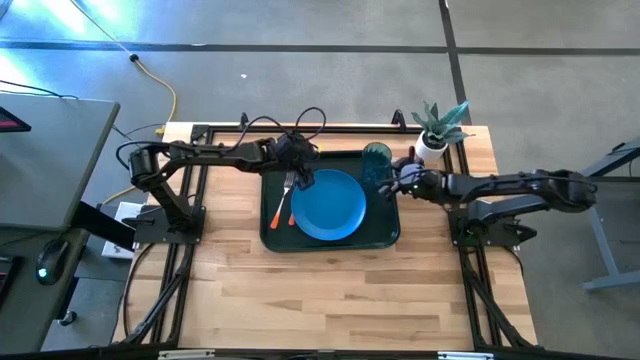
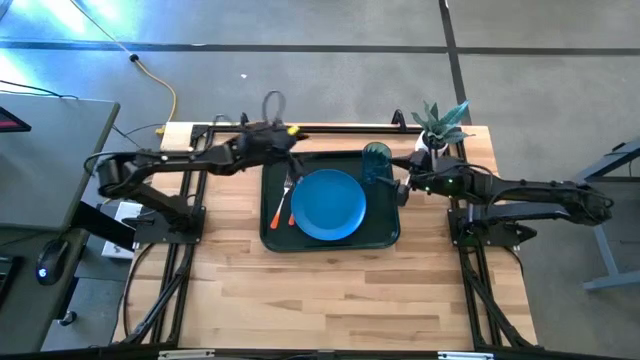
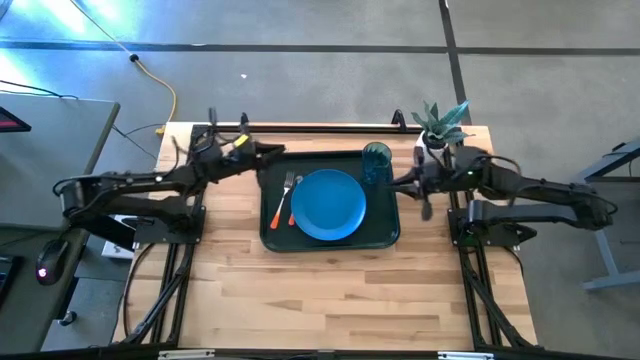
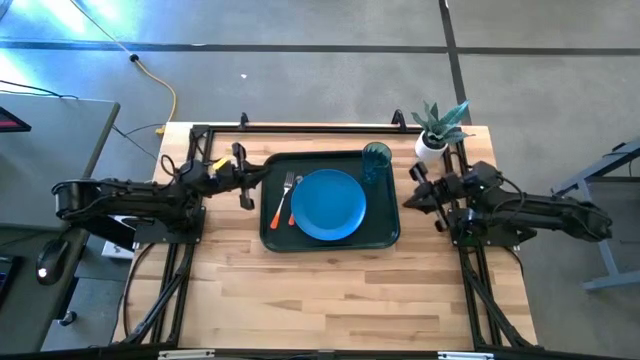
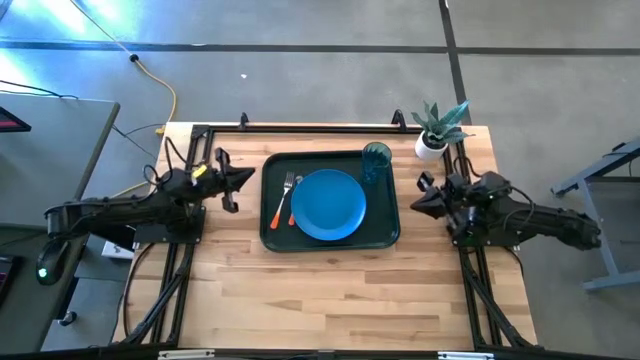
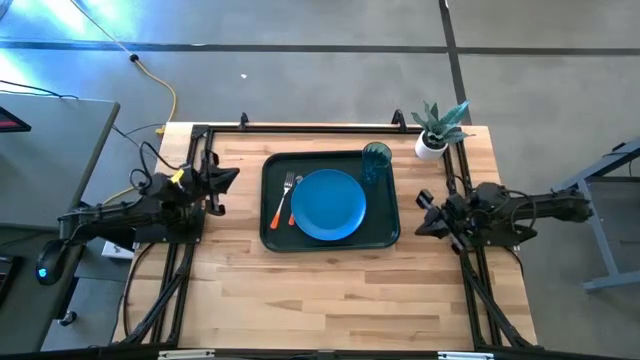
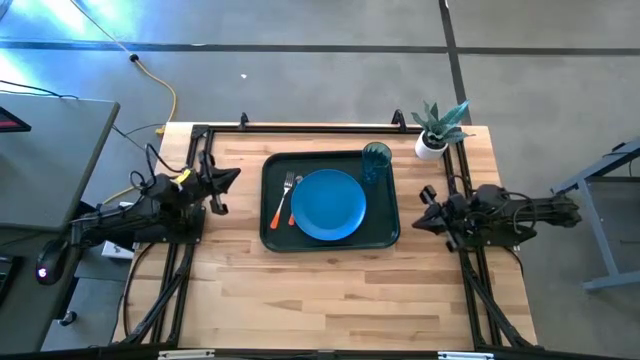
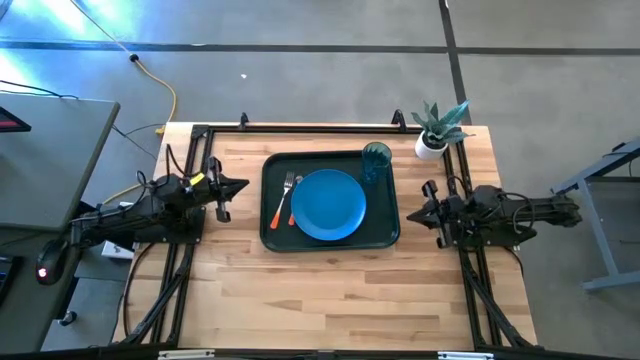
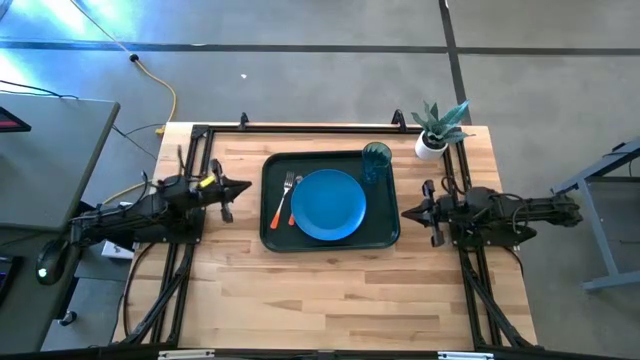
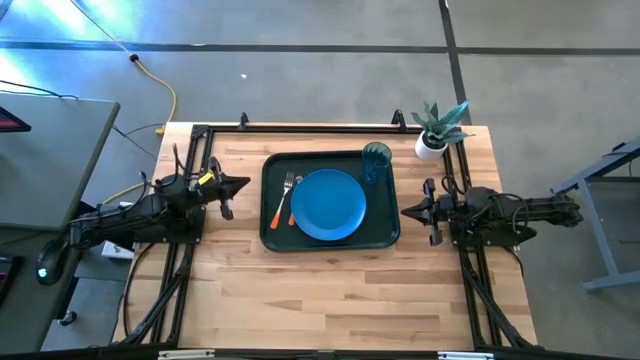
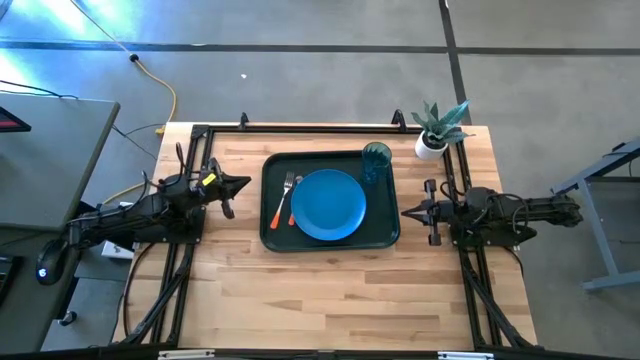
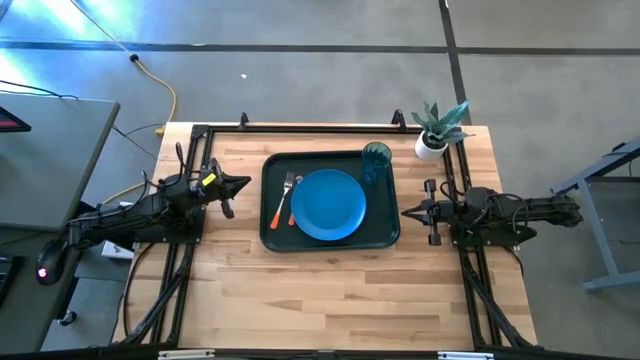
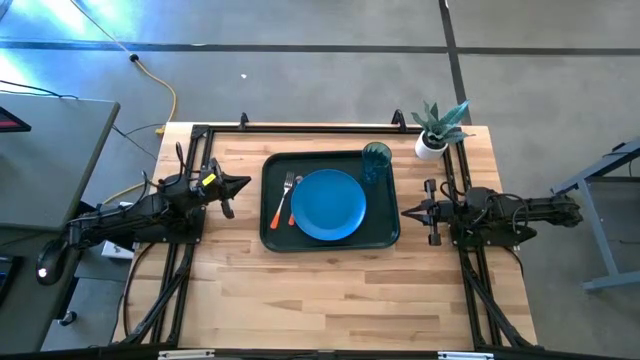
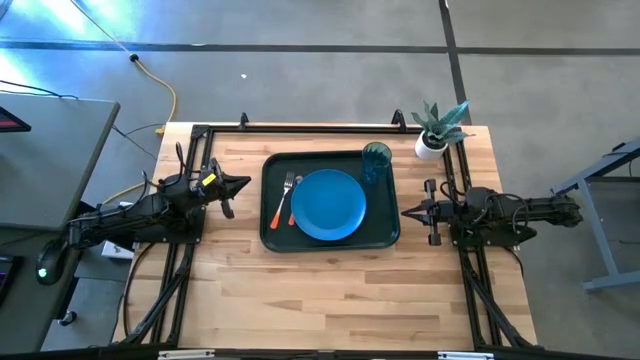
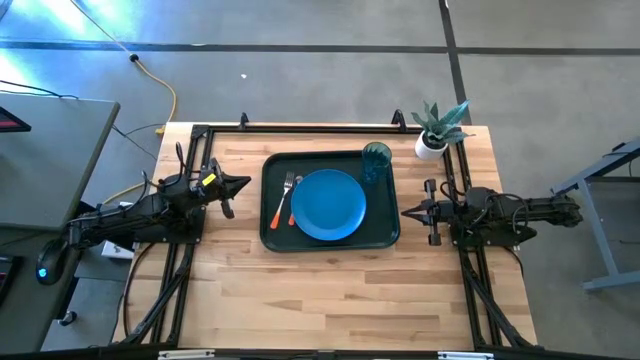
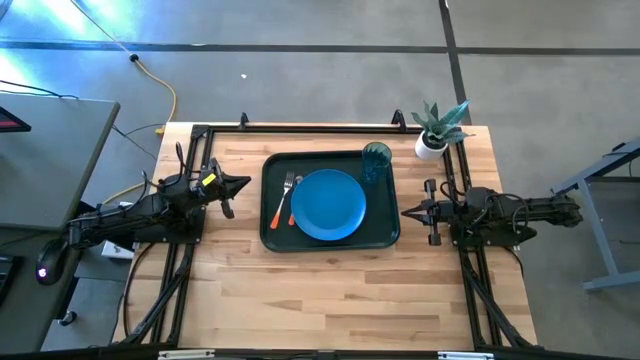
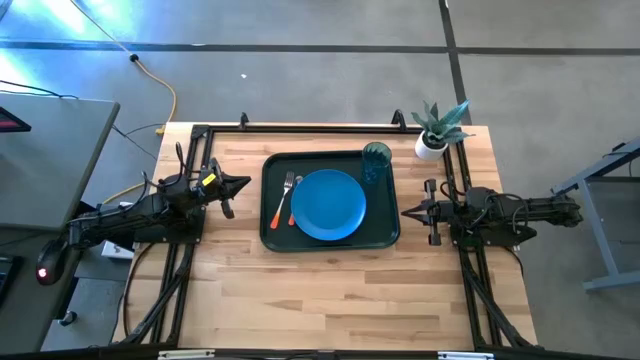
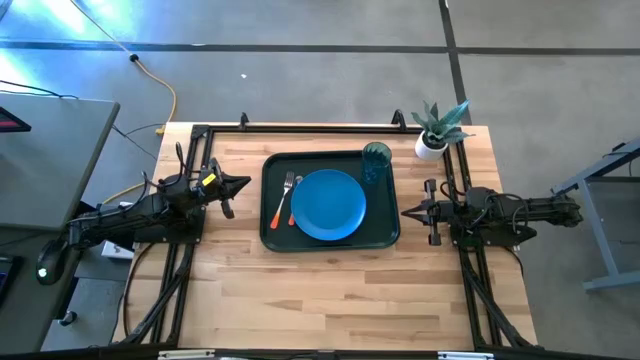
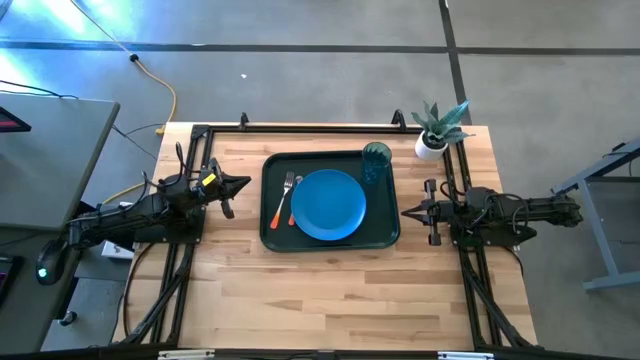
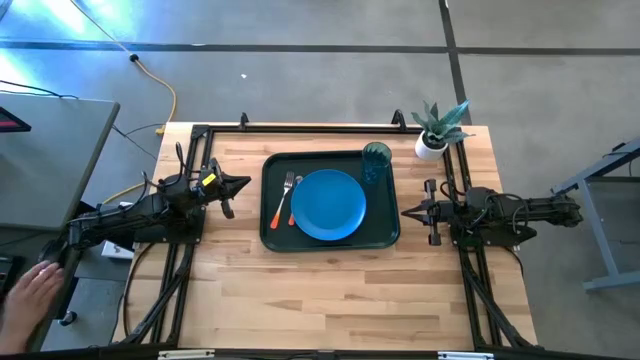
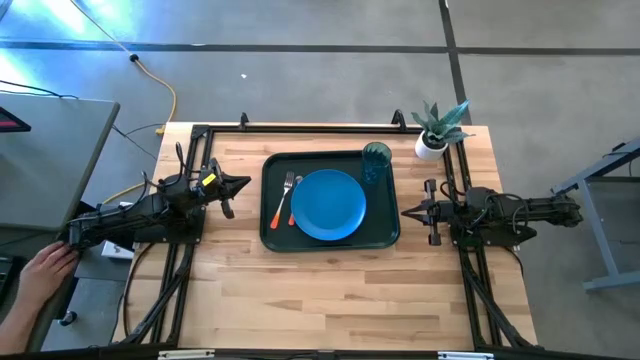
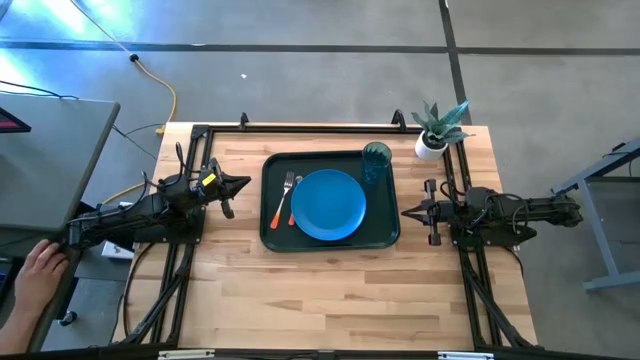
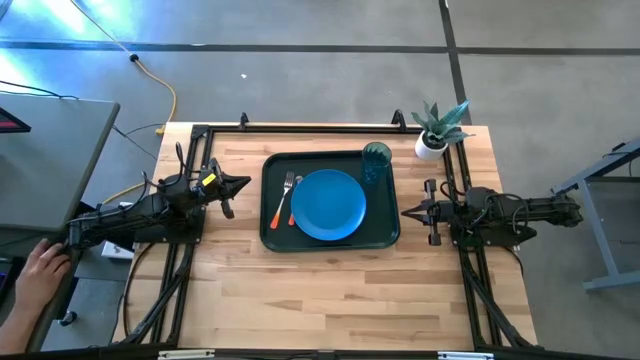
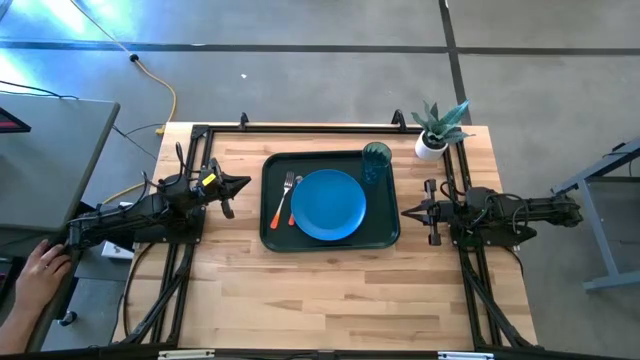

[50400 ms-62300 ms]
Task: Pick and place plate/cup/fork/spoon on tray
Return to Home Position

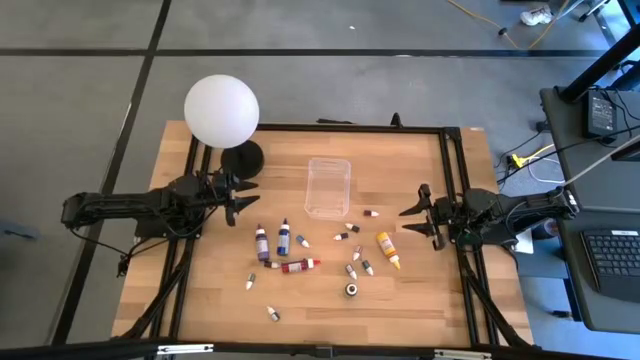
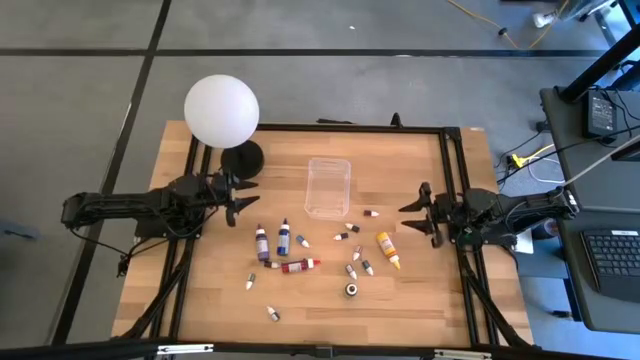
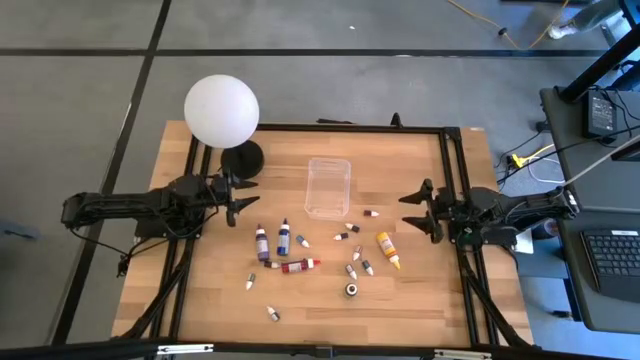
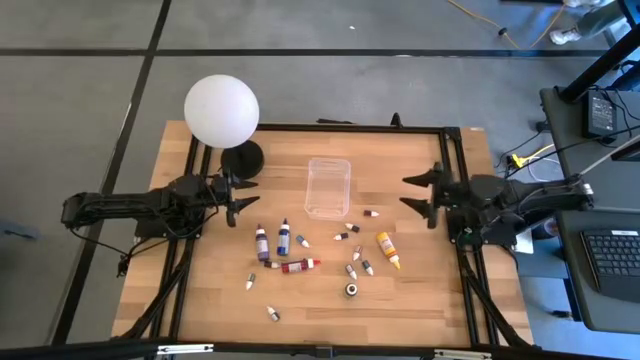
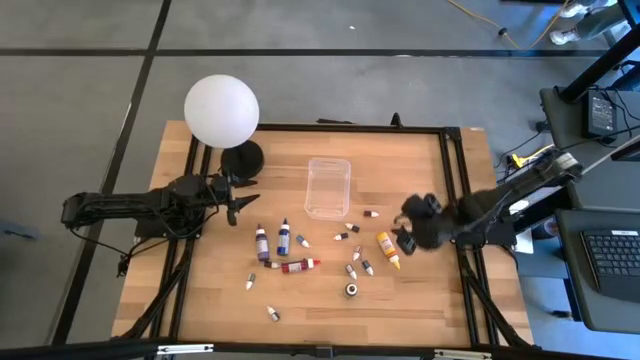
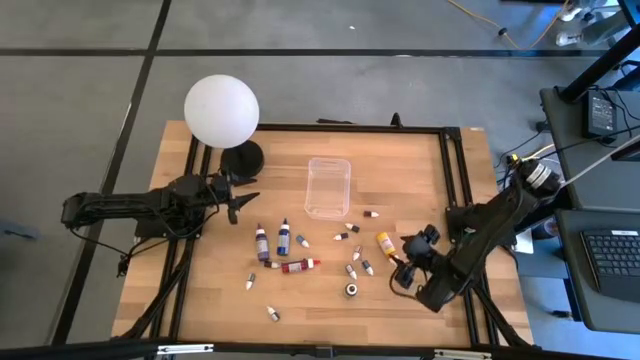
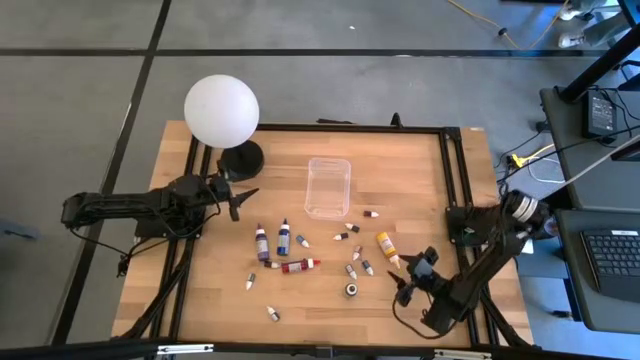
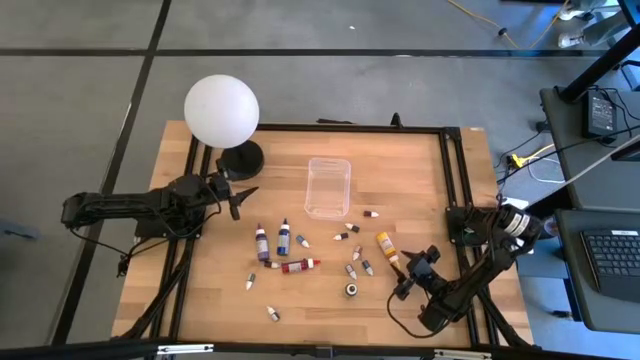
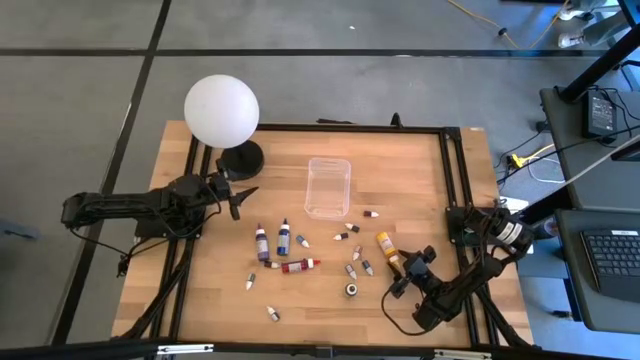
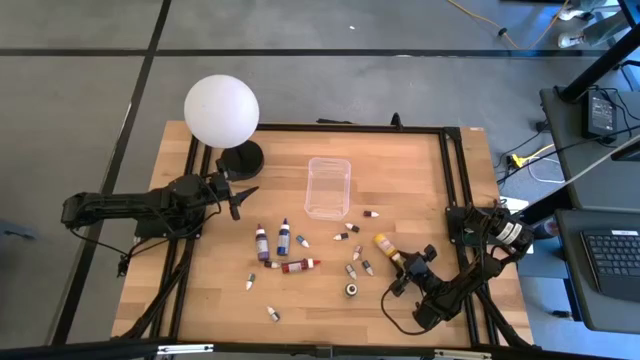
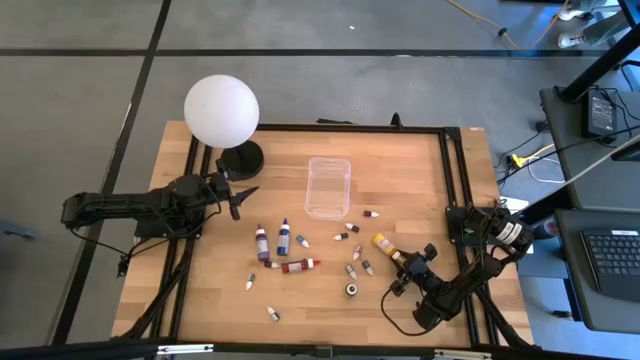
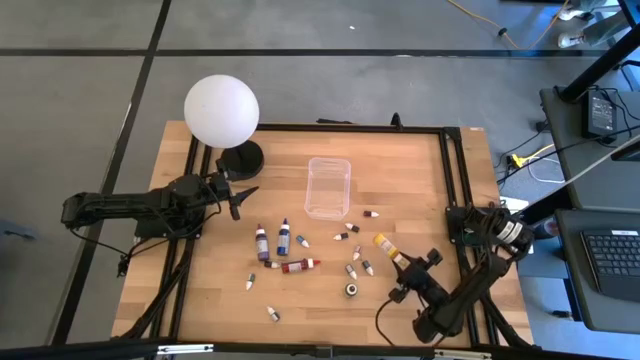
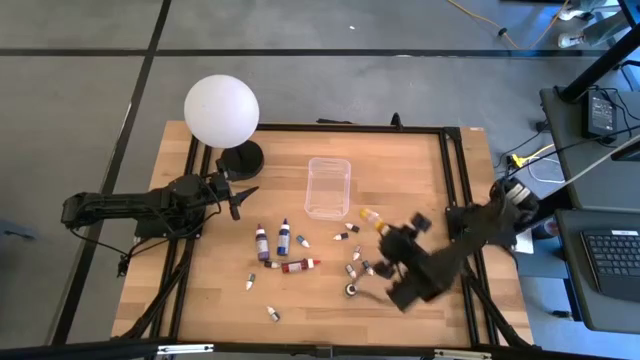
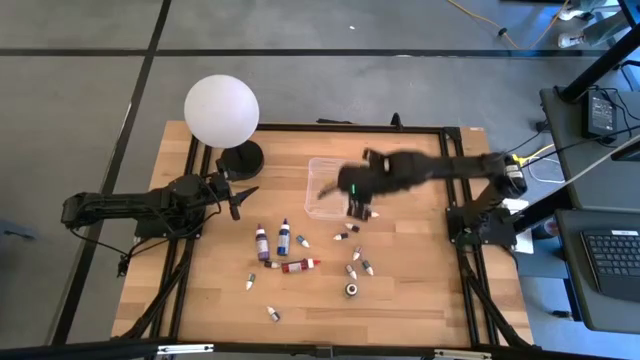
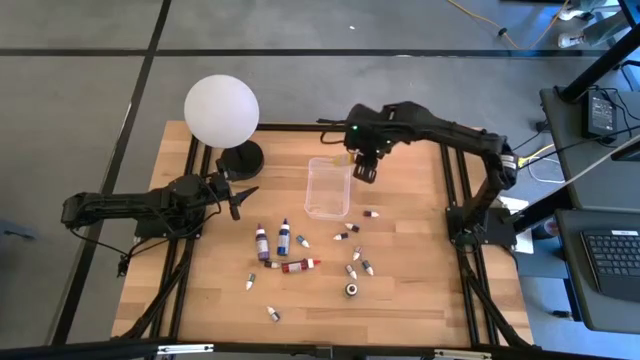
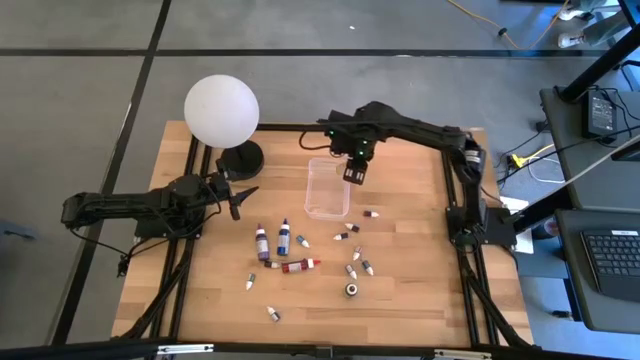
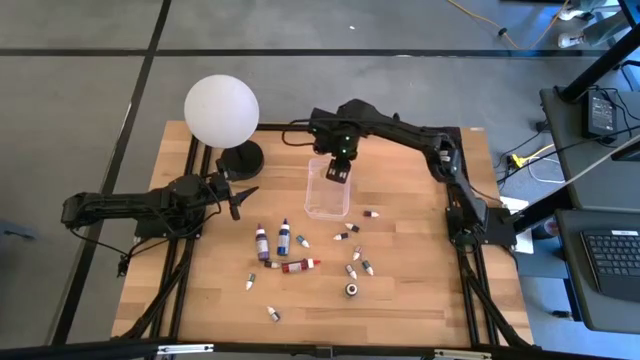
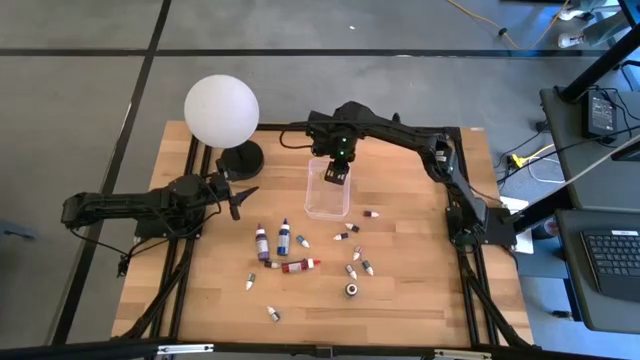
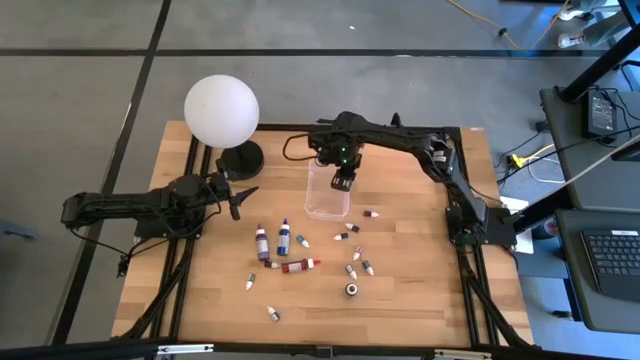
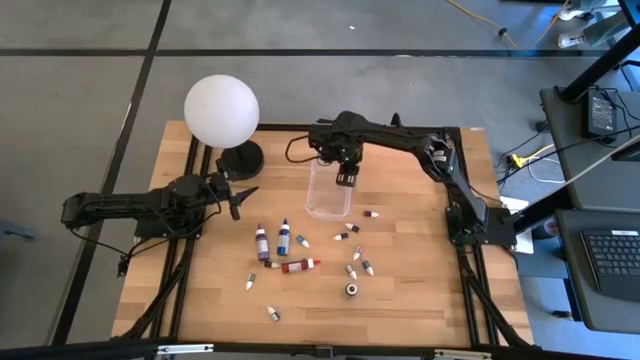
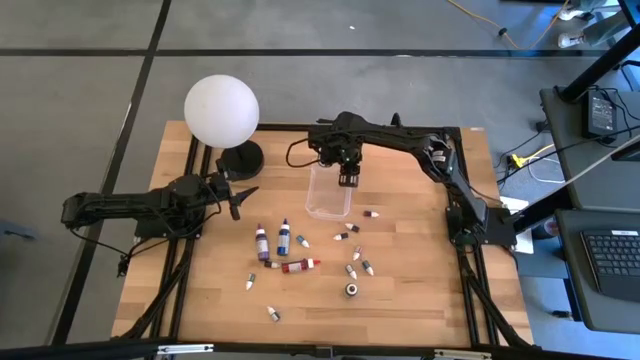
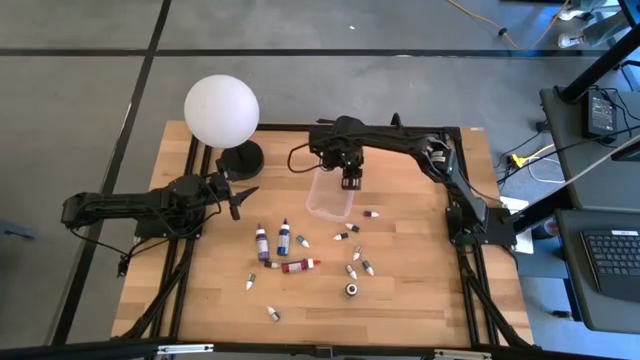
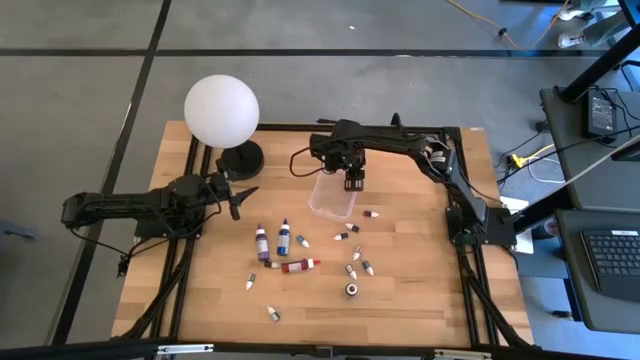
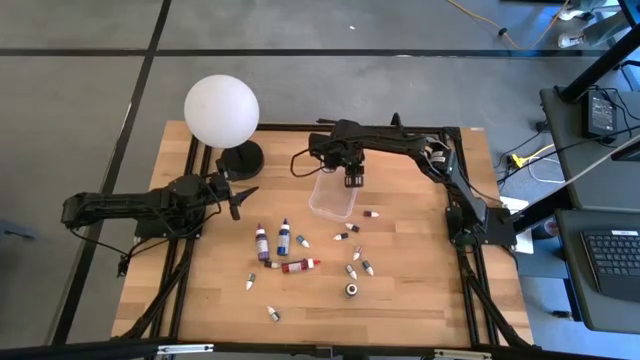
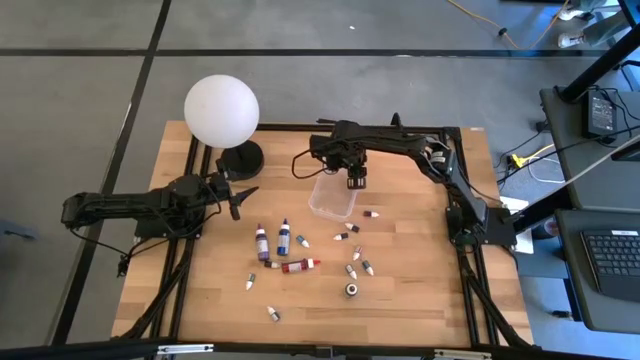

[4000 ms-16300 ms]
Task: Pick & Place food coloring
Put the large yellow food coloring bottle in the transparent bin
